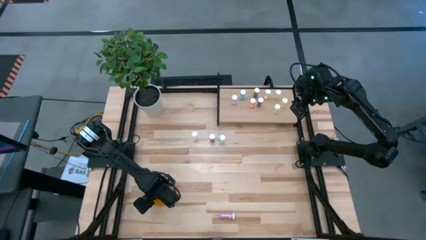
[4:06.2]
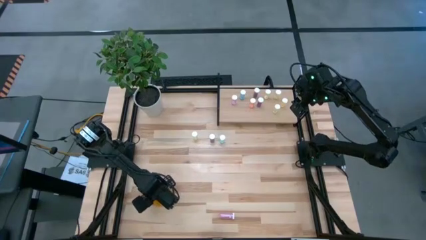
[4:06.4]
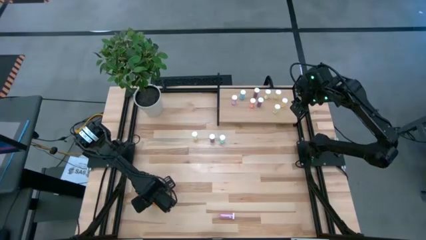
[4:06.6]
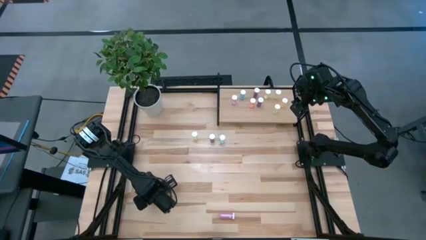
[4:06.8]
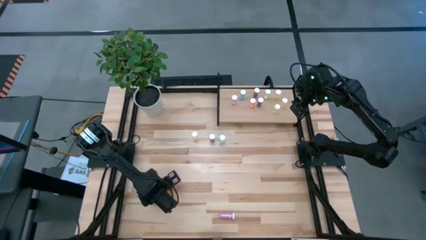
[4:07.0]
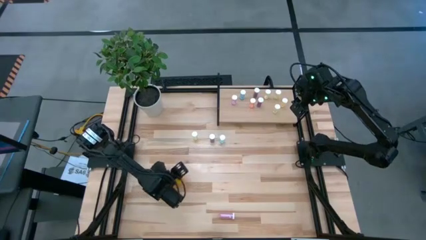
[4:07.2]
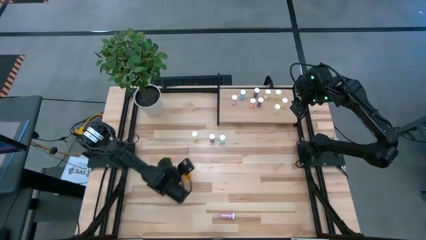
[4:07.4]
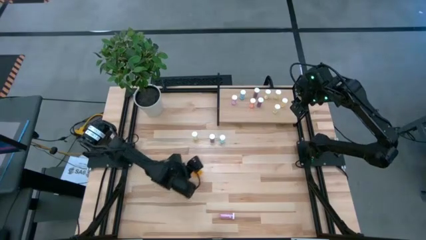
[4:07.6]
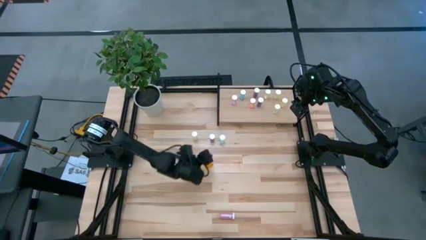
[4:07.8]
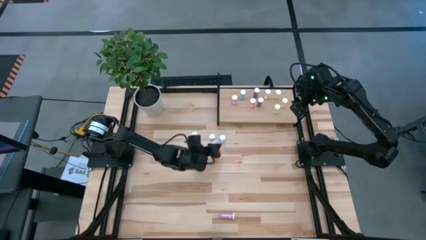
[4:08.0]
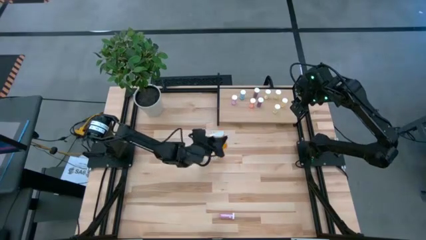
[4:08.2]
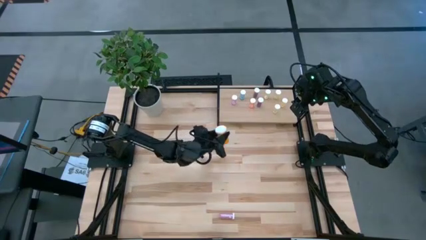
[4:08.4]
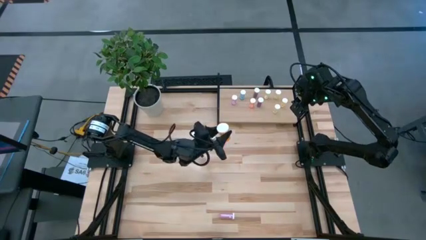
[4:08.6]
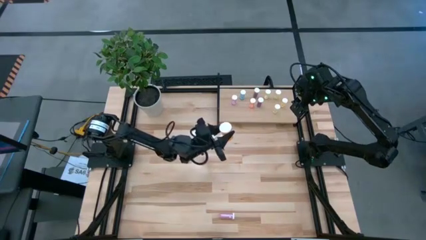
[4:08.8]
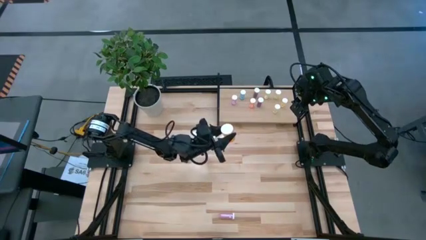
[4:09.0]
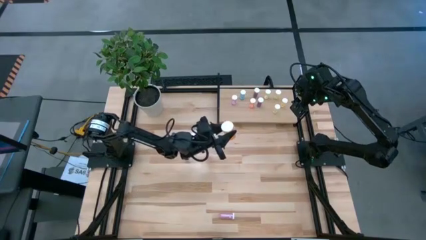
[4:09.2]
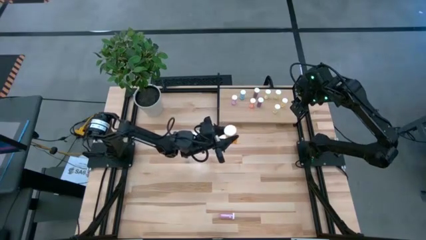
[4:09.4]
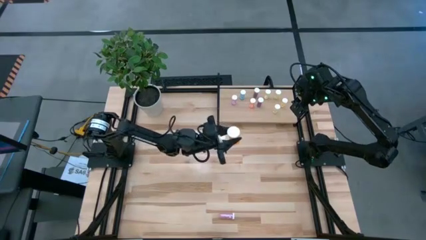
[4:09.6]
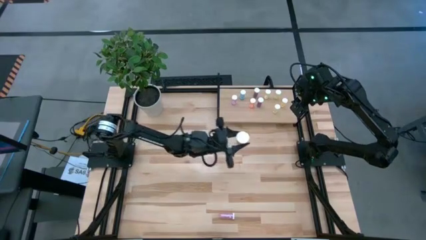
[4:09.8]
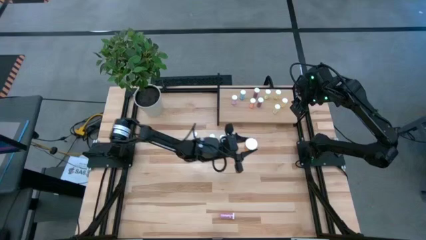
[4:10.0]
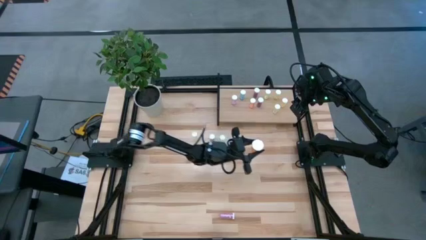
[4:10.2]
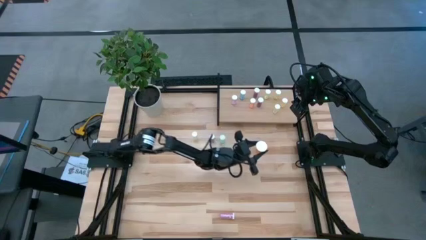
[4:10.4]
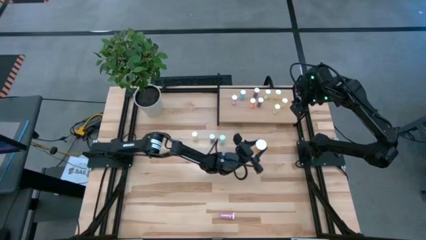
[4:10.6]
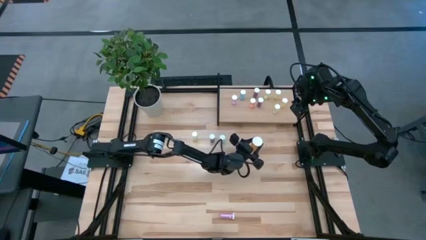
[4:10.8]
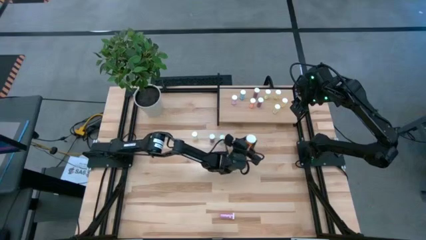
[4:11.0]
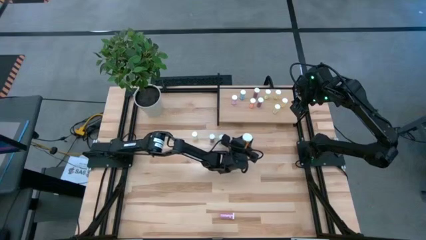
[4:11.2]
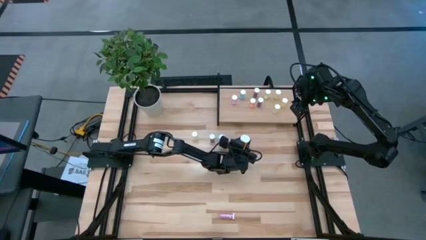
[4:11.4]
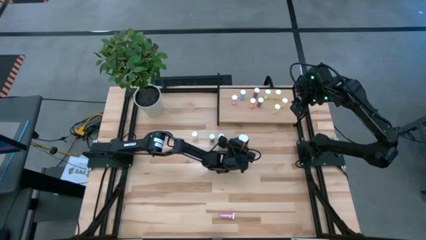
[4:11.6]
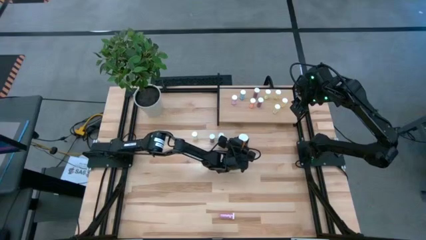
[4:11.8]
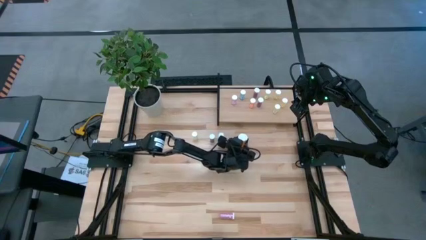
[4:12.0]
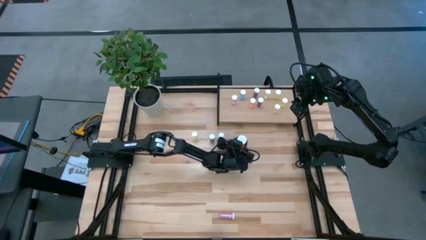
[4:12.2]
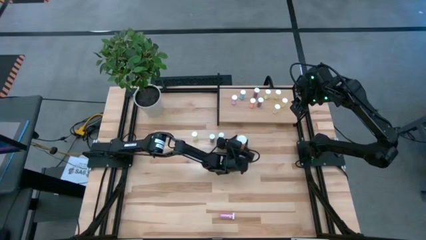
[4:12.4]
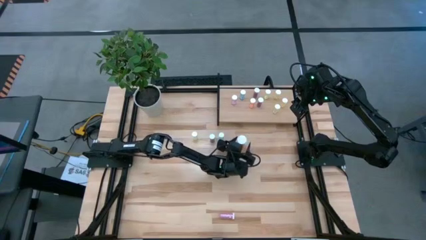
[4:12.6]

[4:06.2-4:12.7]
Task: Pick and place medicine bottles onto shelf by color
Move the orange pill bottle to the center of the table

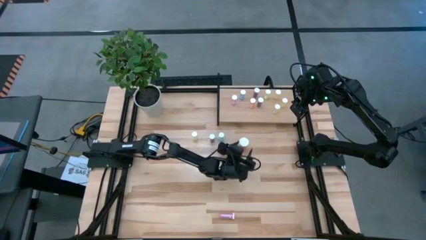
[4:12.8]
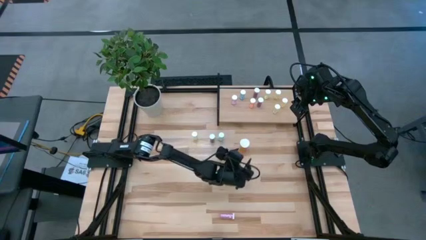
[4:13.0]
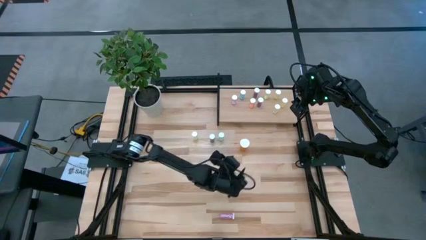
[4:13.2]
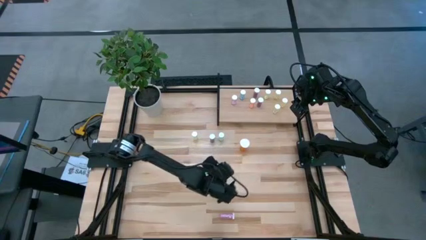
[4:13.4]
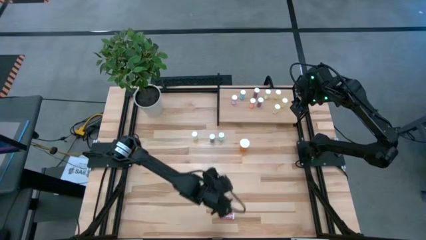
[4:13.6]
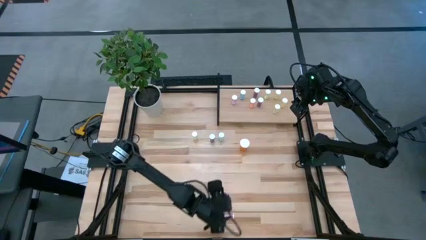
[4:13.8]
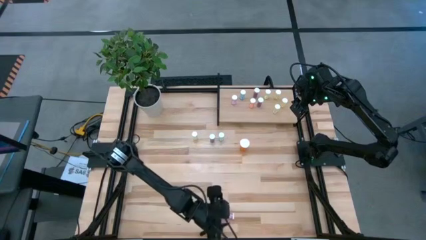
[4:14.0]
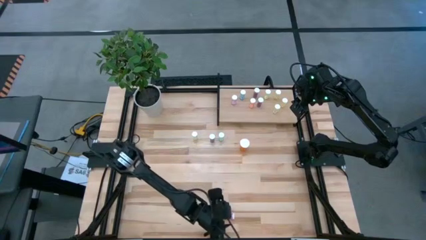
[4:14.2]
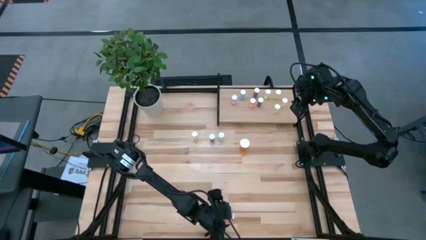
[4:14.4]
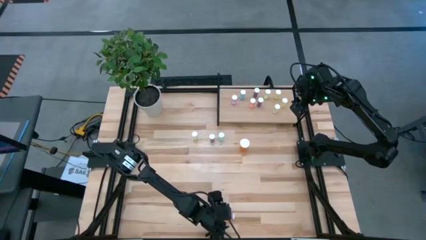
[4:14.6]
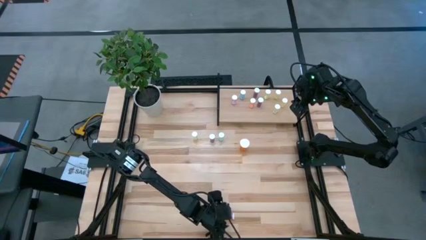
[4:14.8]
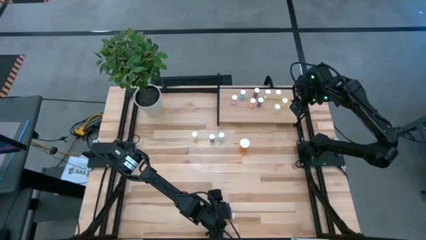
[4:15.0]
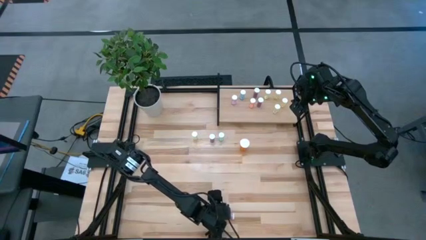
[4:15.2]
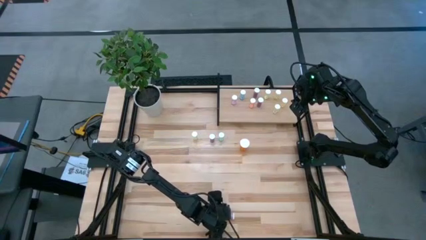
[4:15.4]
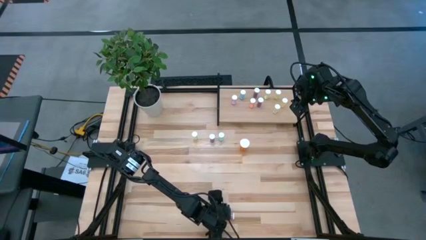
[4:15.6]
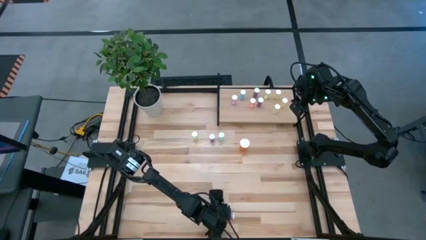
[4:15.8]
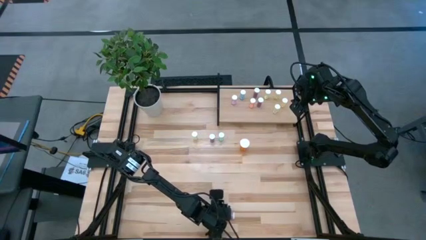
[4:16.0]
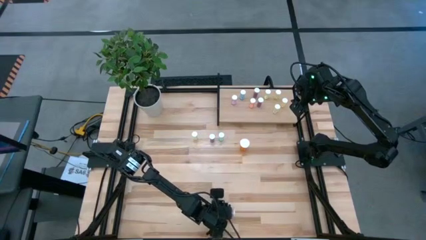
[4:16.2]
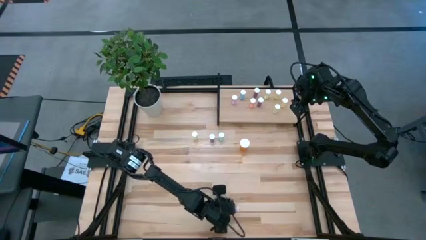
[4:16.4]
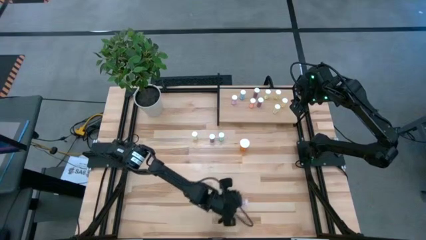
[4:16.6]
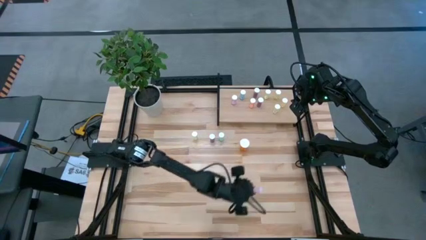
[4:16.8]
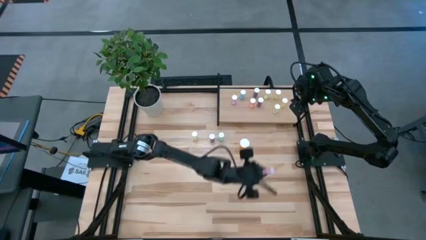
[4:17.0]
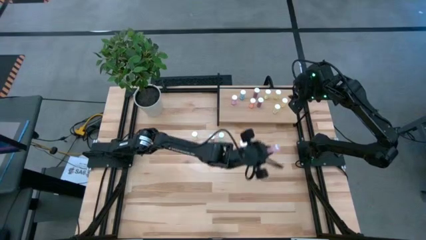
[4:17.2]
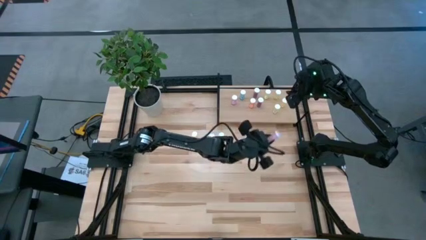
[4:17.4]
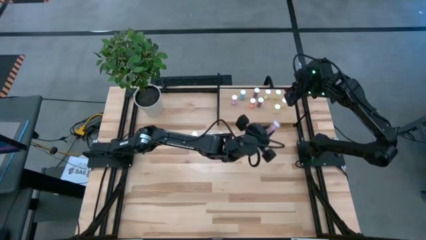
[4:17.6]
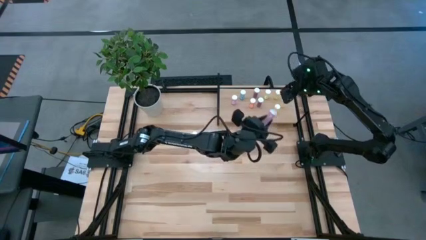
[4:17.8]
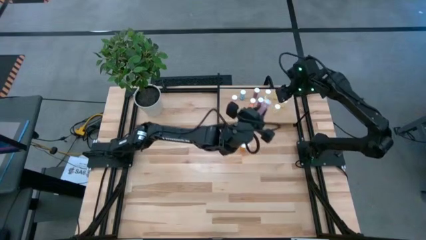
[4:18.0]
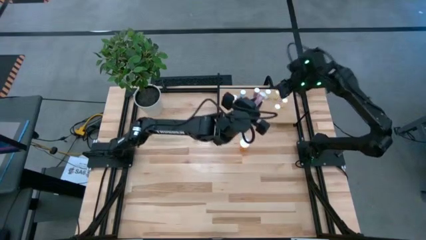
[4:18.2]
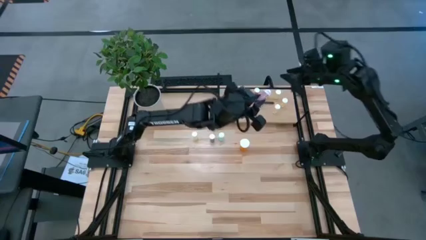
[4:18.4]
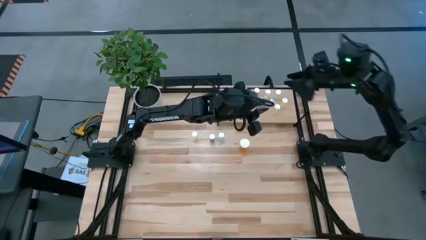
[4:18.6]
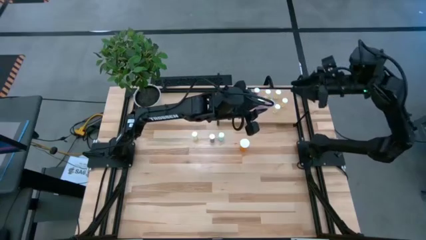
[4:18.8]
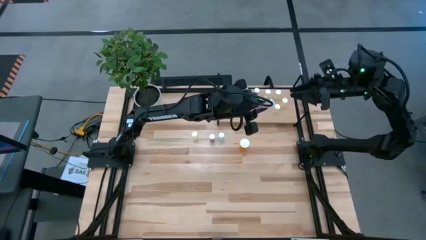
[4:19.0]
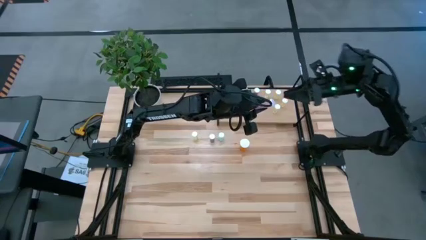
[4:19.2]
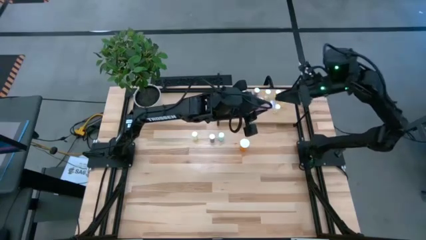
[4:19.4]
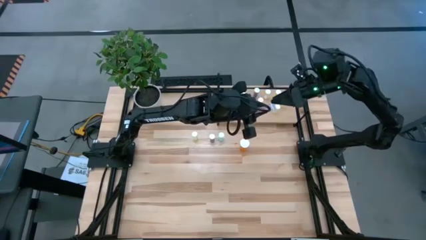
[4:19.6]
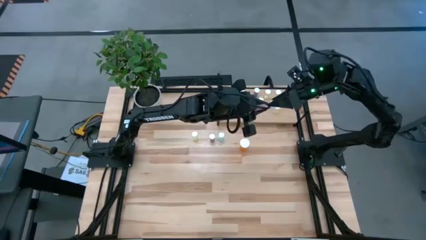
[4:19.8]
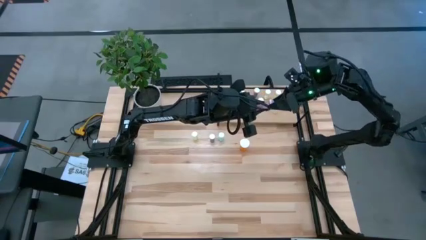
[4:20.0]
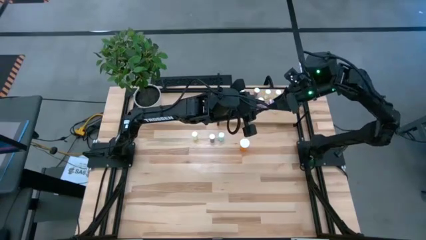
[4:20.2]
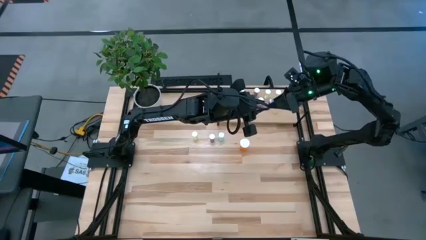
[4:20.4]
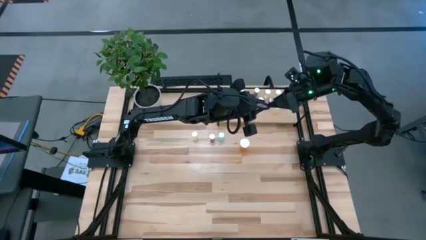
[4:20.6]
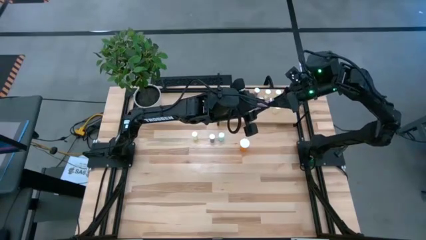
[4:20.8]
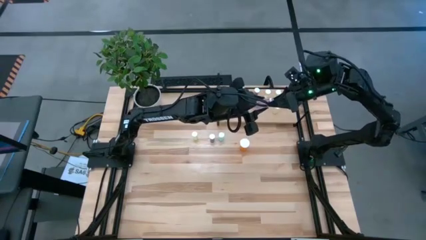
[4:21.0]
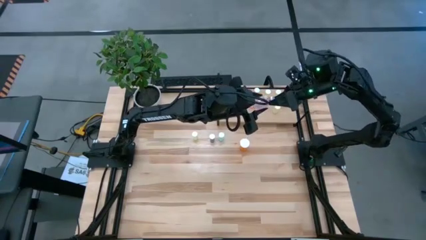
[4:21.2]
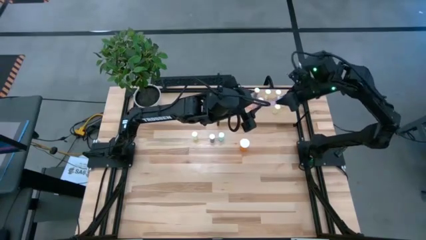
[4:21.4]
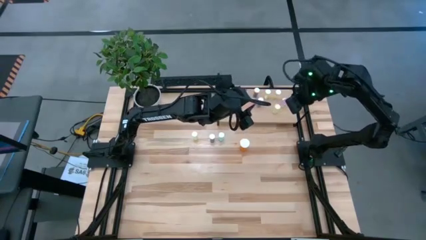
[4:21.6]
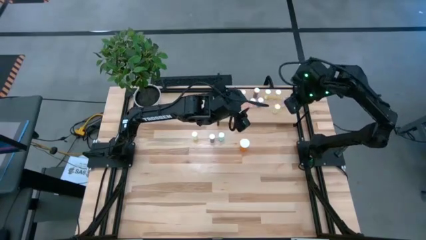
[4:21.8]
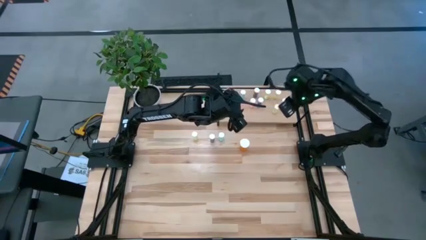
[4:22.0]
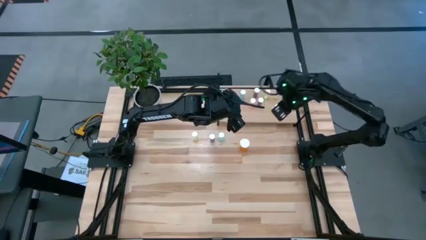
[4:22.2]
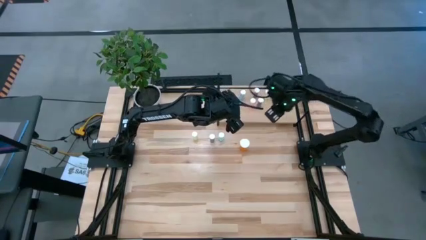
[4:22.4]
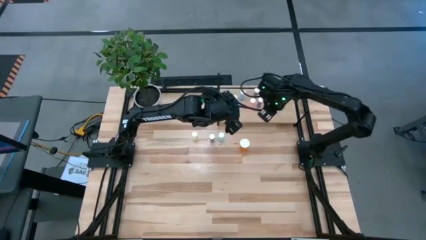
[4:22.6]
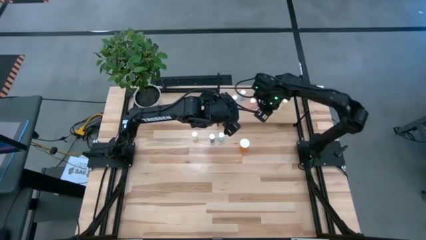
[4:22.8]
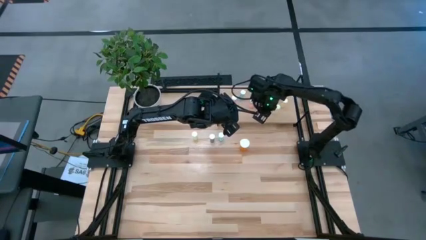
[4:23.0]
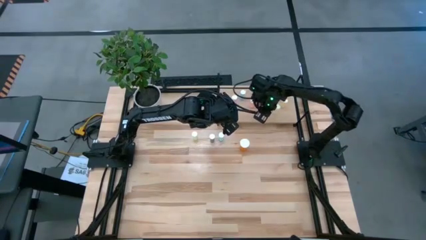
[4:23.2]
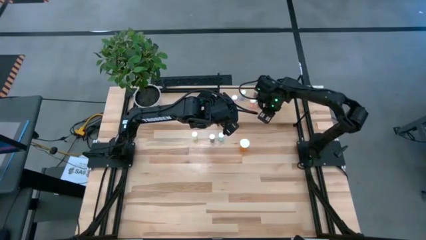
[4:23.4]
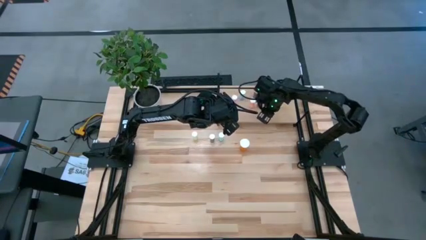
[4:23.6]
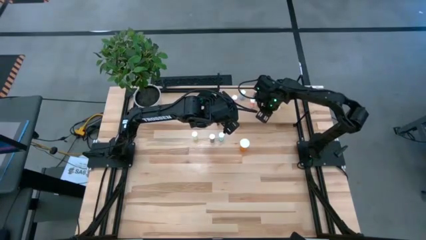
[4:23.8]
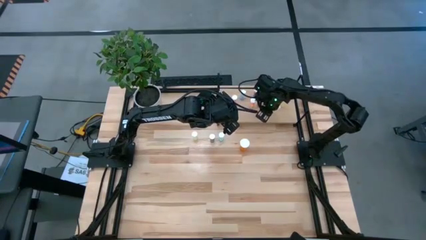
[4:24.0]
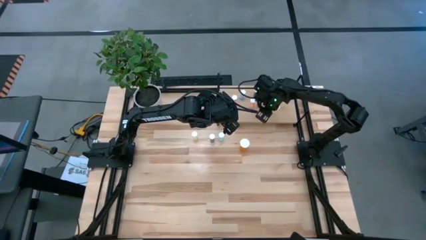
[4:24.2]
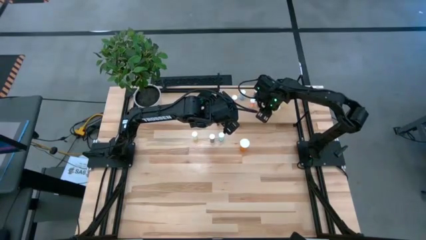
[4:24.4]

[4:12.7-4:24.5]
Put the pink pill bottle on the shelf
